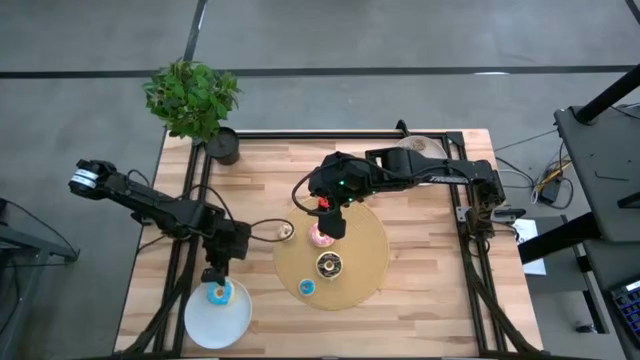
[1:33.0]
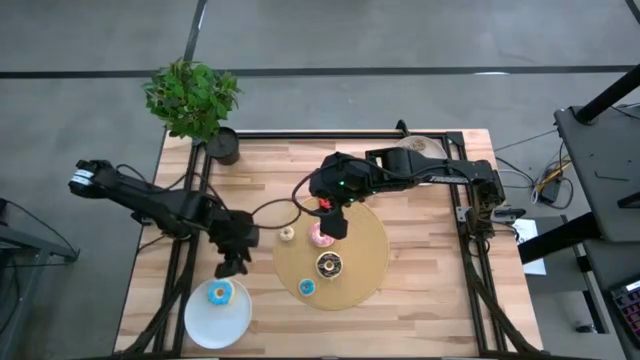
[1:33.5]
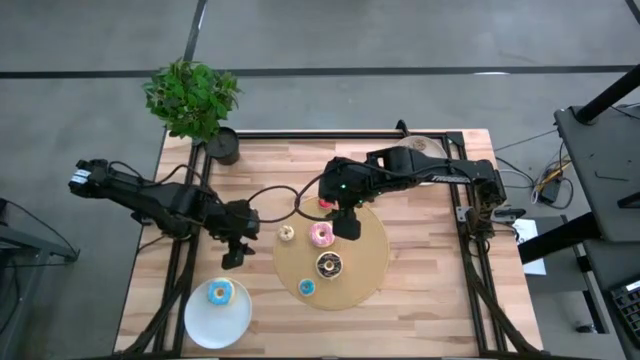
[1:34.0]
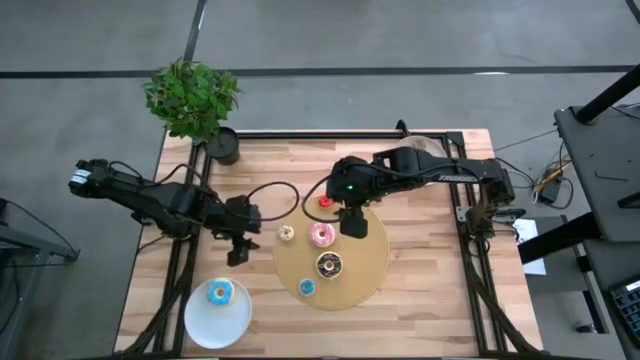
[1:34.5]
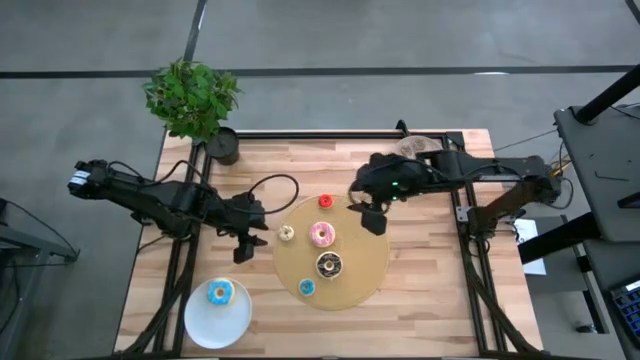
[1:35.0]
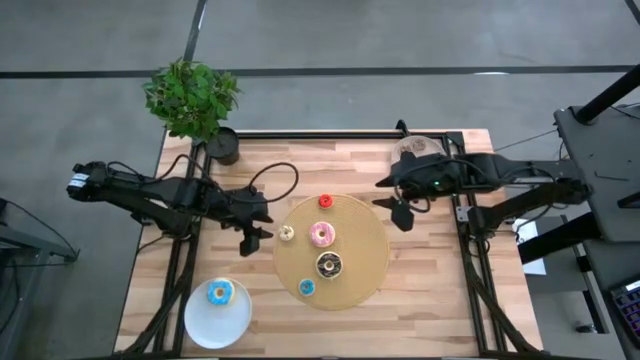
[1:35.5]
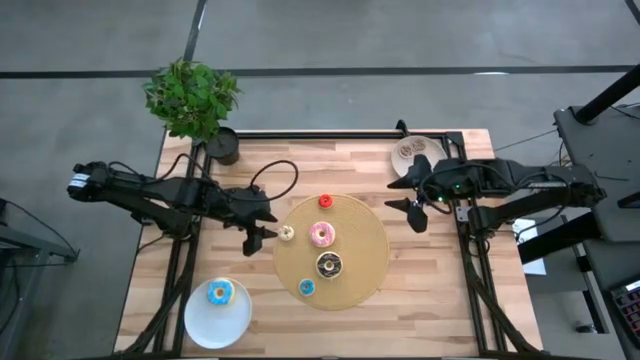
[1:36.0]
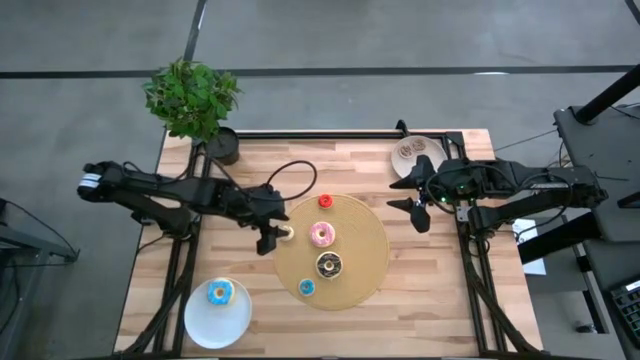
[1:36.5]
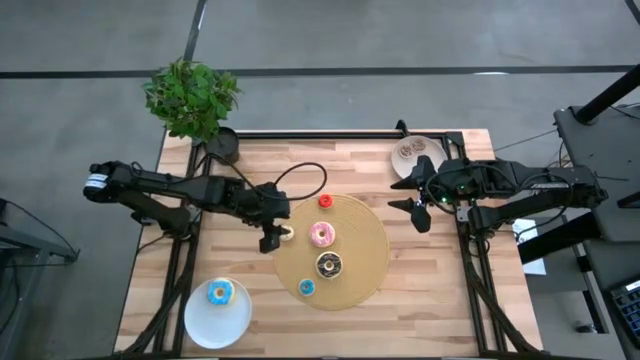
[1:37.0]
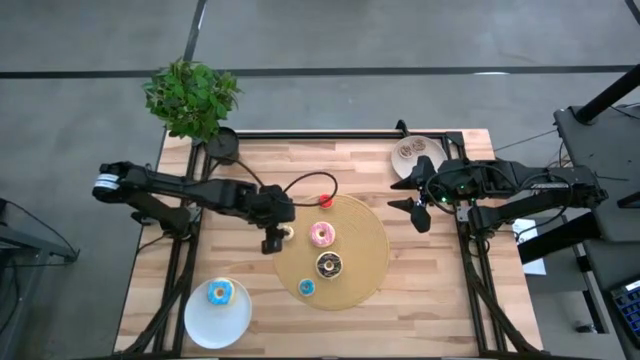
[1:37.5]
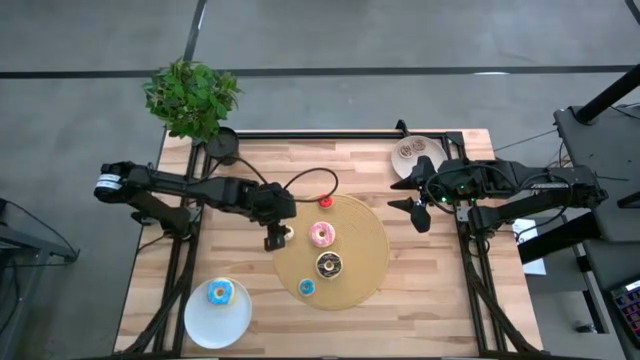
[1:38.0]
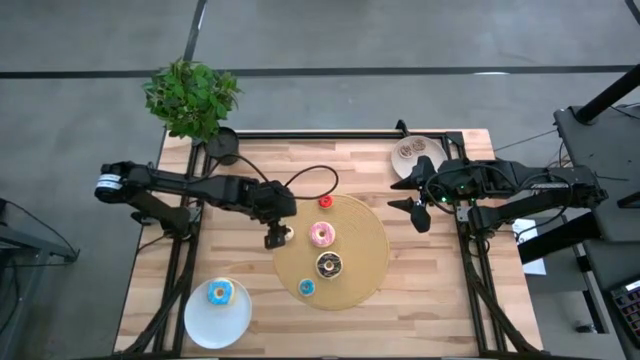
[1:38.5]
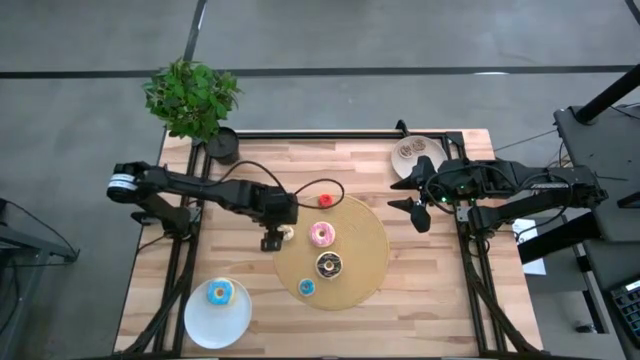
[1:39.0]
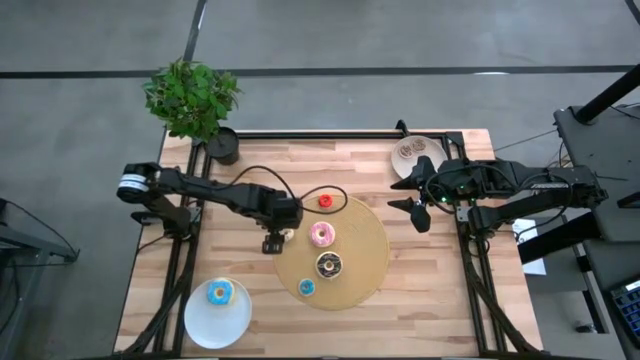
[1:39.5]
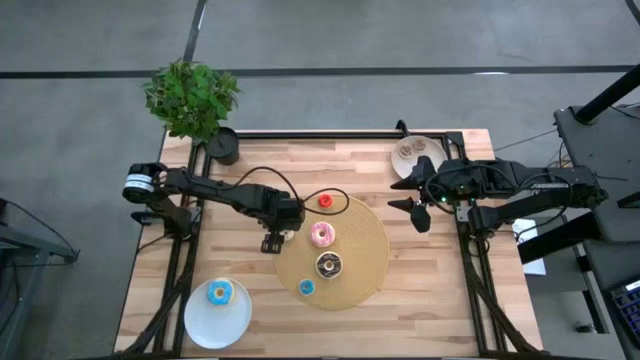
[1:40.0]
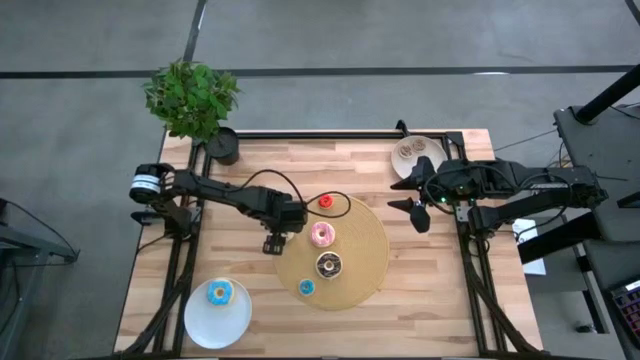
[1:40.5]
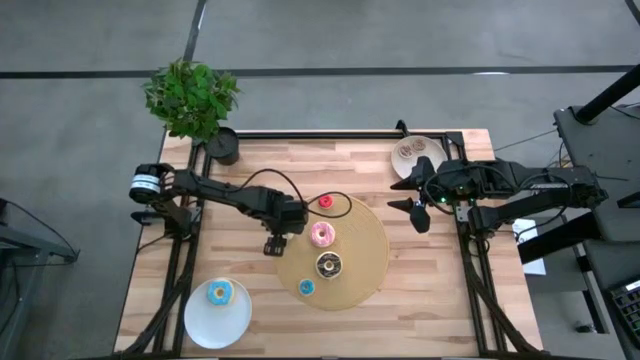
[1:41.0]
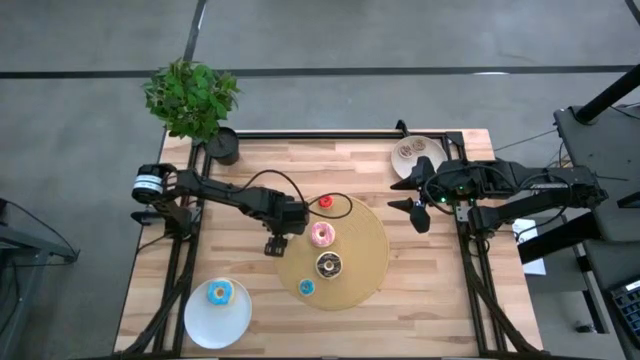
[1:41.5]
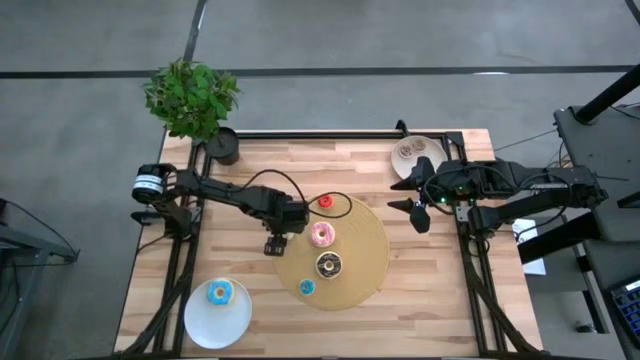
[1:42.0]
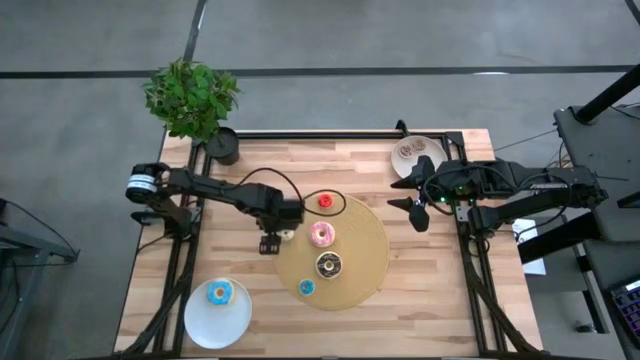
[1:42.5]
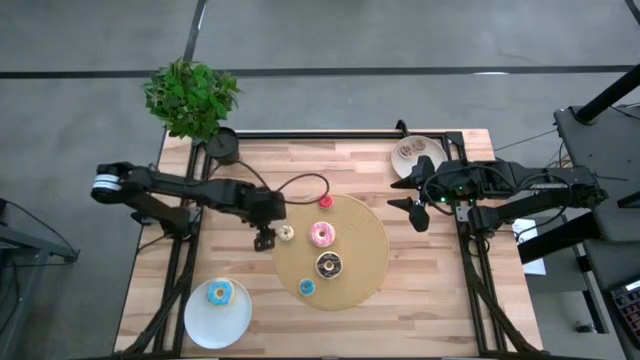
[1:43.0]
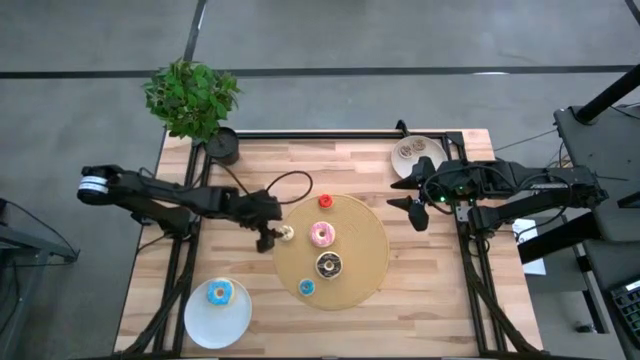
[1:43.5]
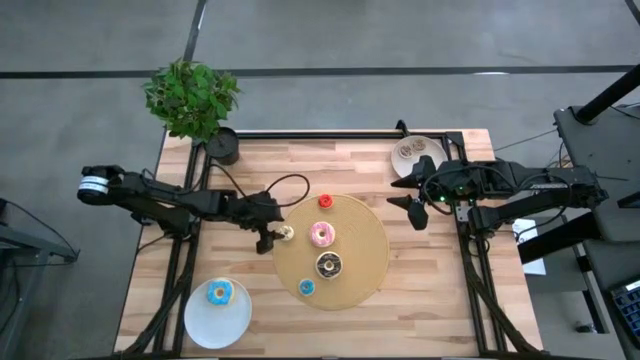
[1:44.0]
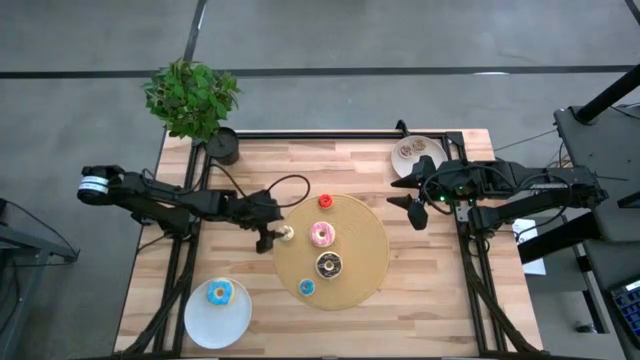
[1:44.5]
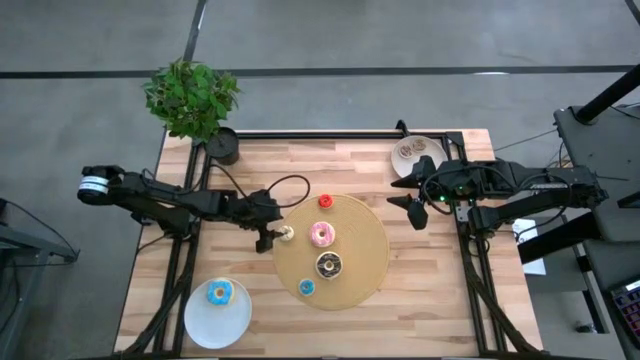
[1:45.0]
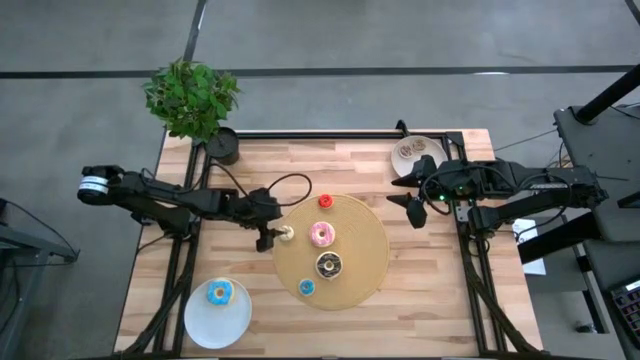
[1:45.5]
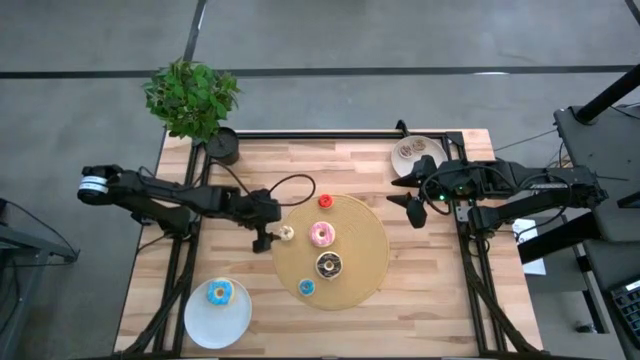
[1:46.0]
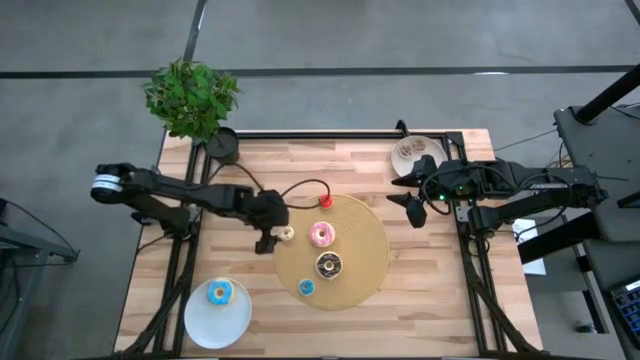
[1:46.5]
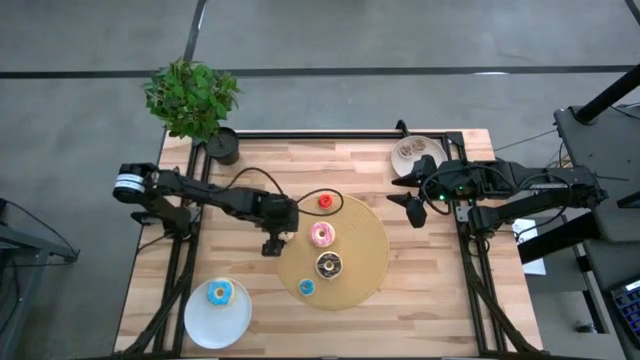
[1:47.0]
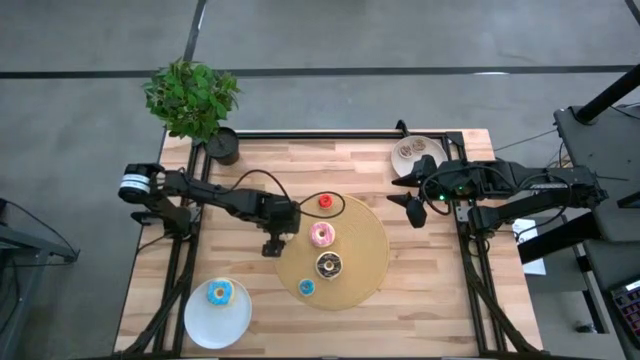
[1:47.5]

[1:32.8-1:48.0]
Task: Pick & Place donuts
Put the small white donut on the gray plate

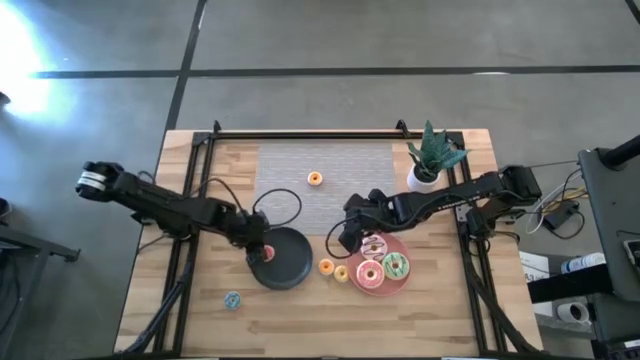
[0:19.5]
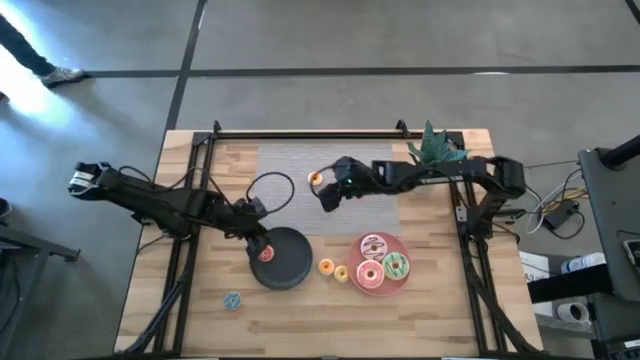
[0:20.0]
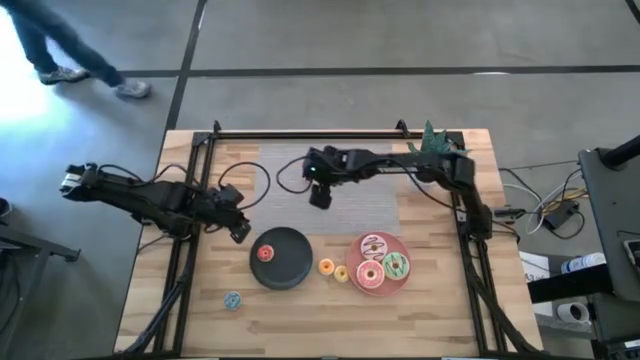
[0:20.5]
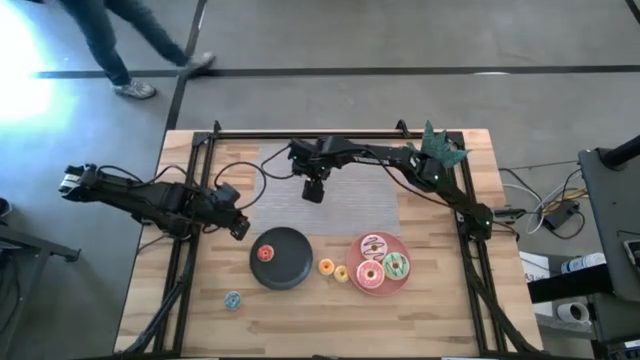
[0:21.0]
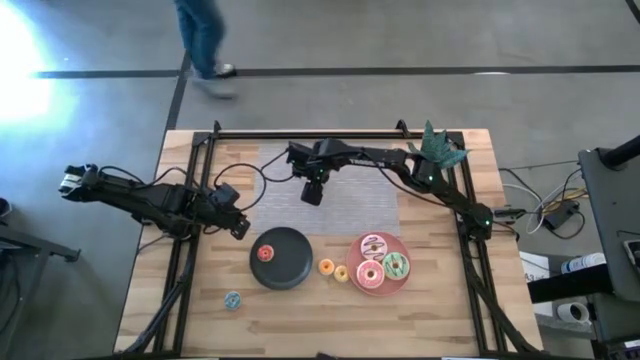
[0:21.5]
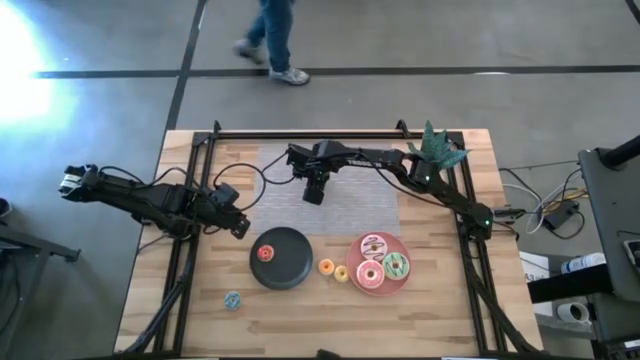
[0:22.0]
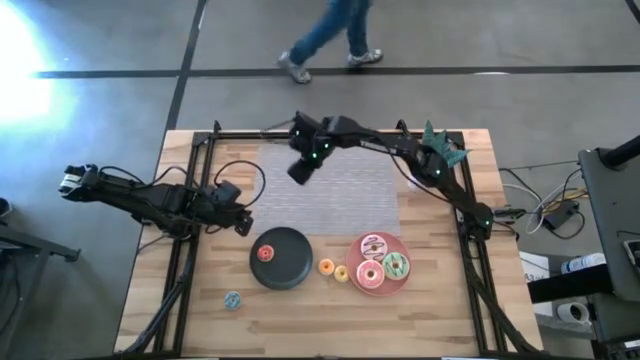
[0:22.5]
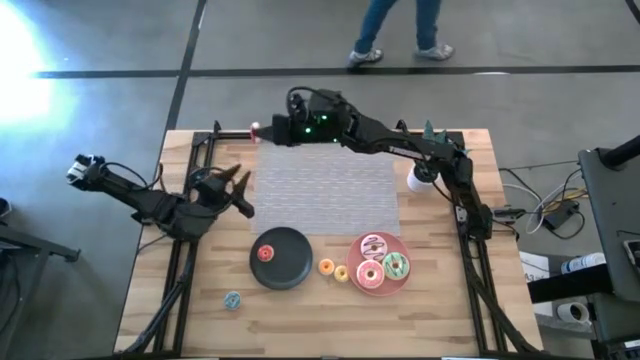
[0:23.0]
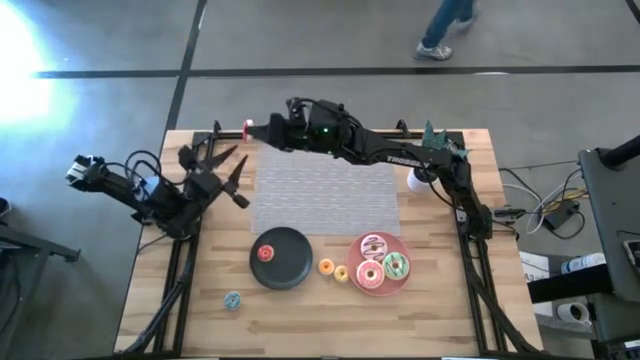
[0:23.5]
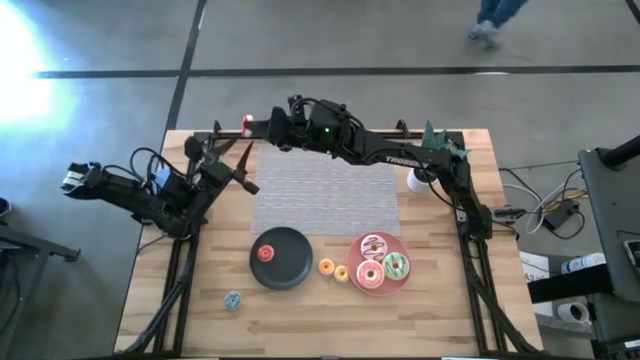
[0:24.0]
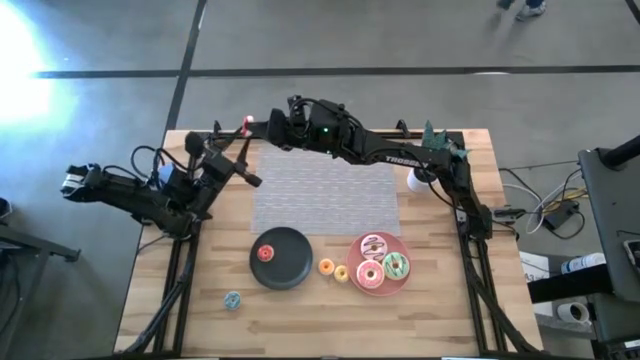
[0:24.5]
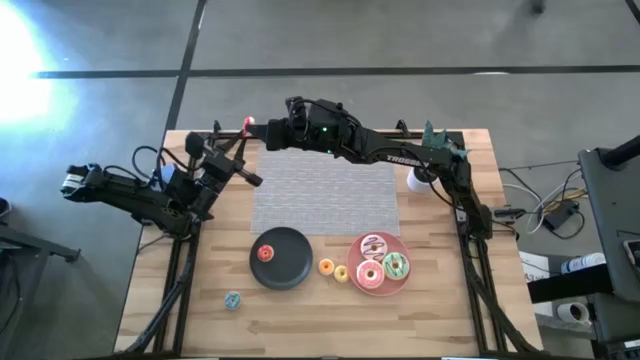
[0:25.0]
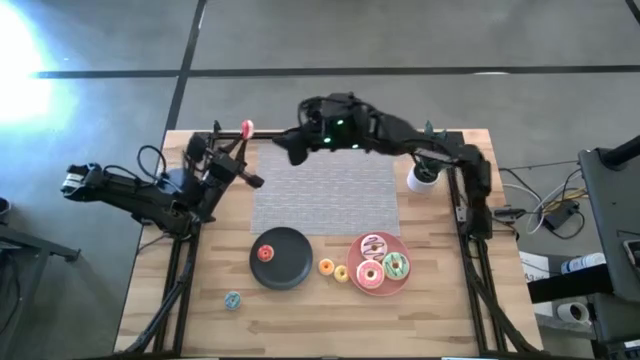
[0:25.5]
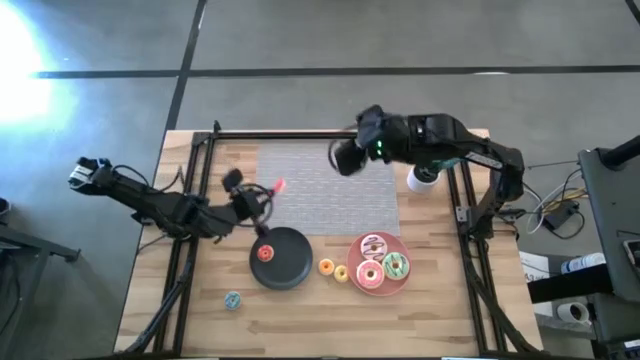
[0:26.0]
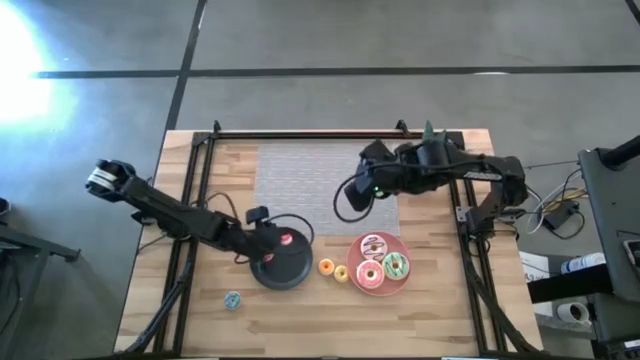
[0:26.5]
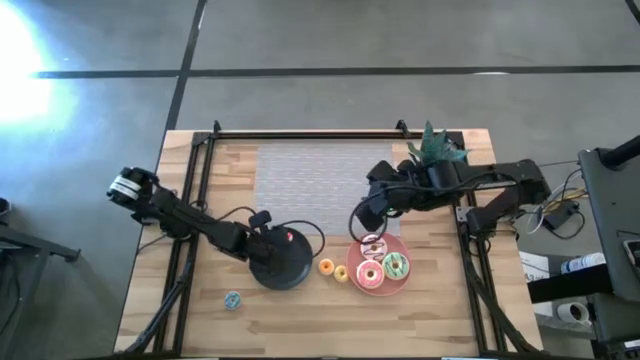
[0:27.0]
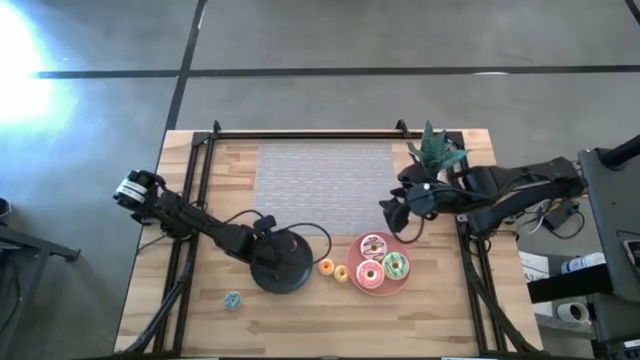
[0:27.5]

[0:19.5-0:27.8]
Task: Pick & Place donuts
Put the small red donut on the black plate
